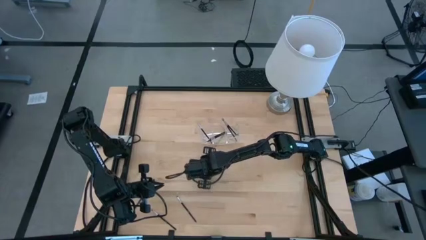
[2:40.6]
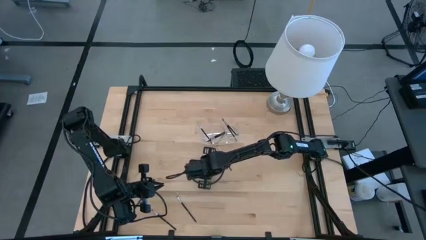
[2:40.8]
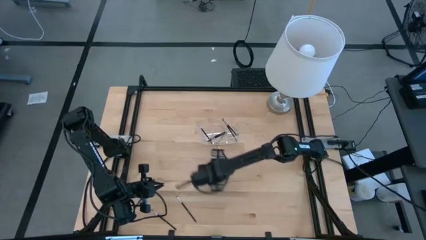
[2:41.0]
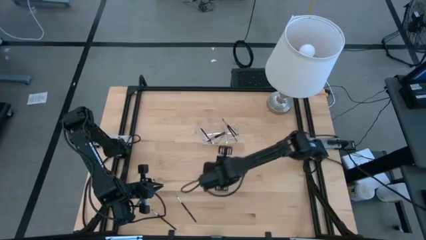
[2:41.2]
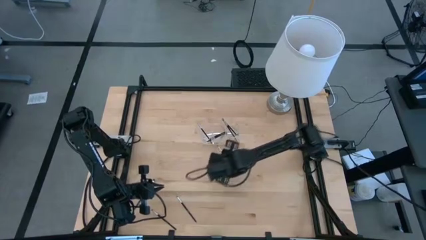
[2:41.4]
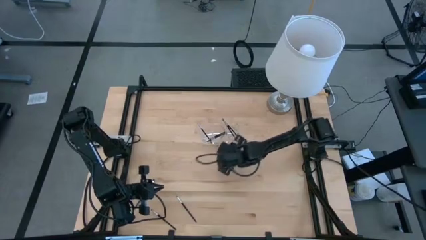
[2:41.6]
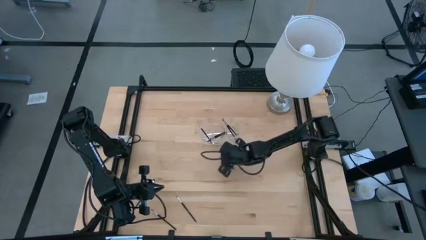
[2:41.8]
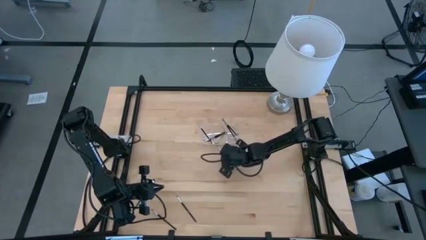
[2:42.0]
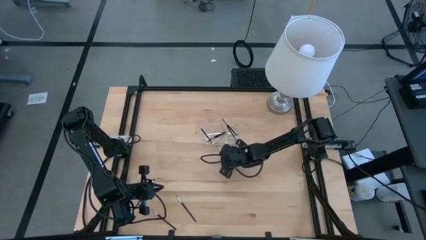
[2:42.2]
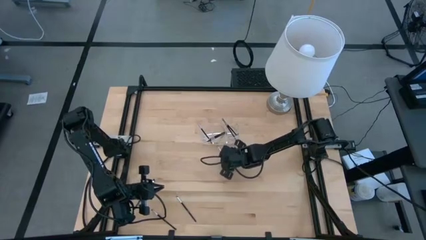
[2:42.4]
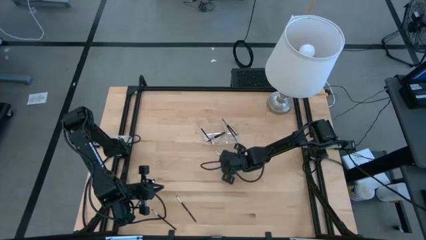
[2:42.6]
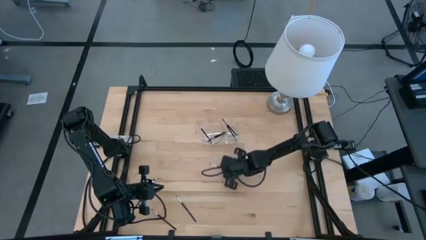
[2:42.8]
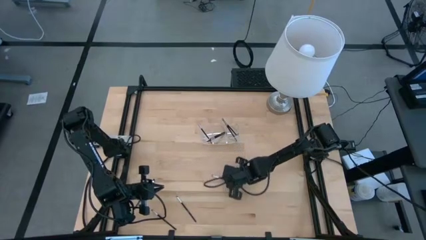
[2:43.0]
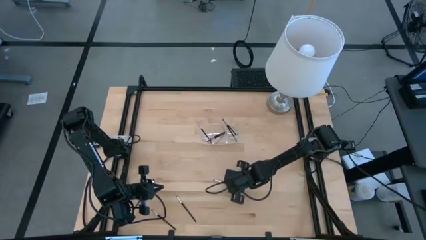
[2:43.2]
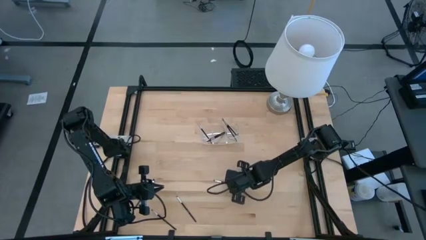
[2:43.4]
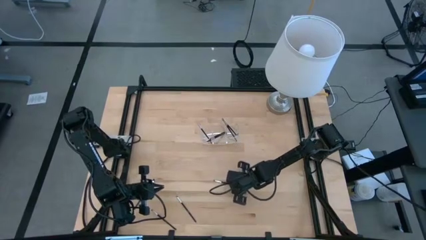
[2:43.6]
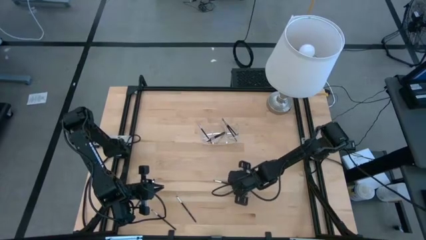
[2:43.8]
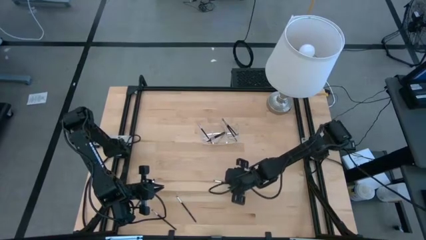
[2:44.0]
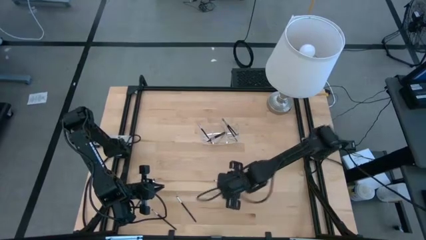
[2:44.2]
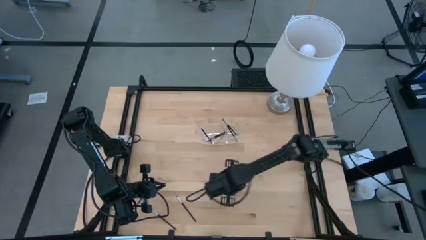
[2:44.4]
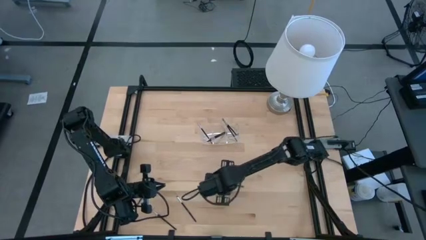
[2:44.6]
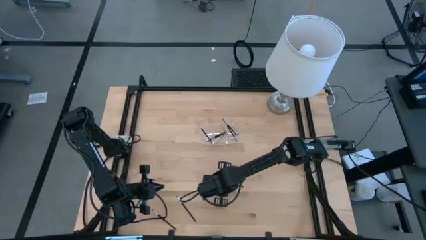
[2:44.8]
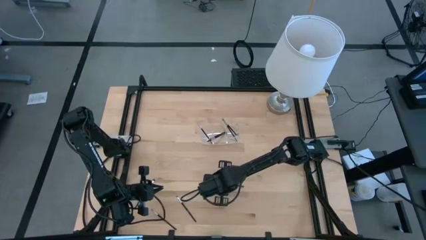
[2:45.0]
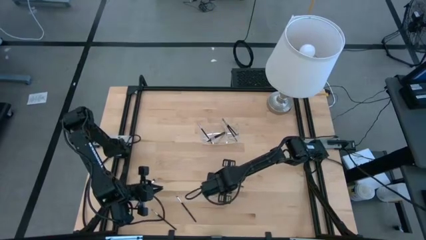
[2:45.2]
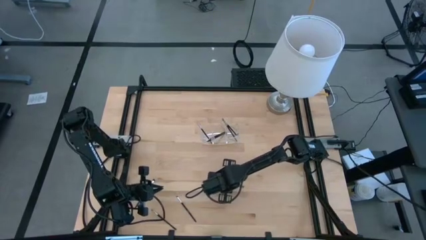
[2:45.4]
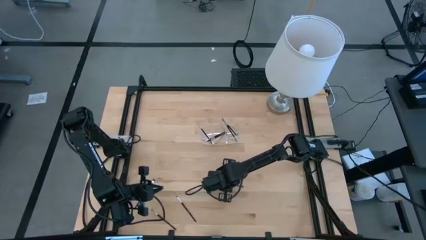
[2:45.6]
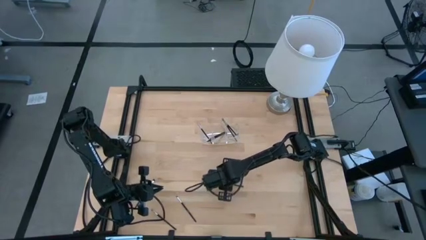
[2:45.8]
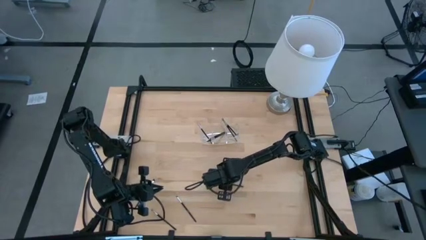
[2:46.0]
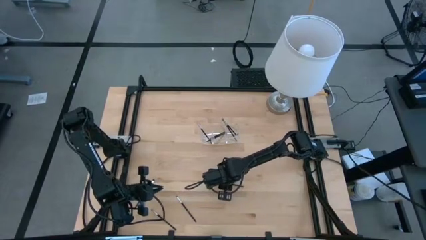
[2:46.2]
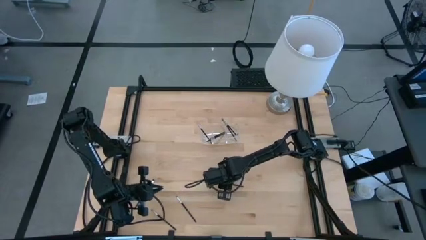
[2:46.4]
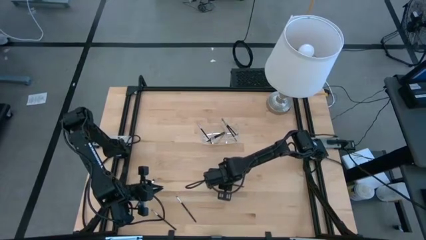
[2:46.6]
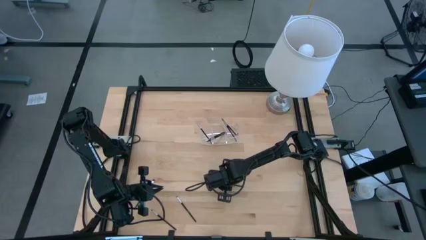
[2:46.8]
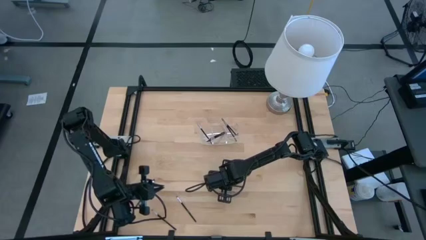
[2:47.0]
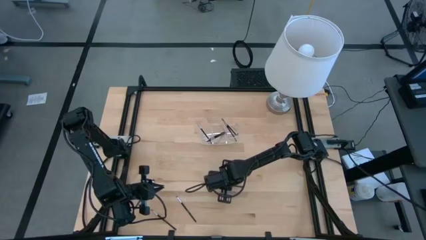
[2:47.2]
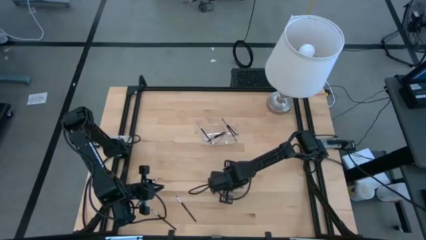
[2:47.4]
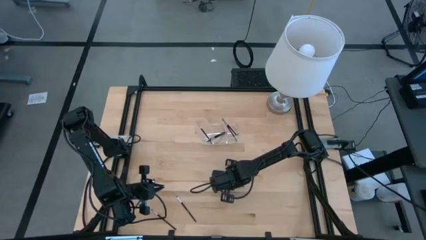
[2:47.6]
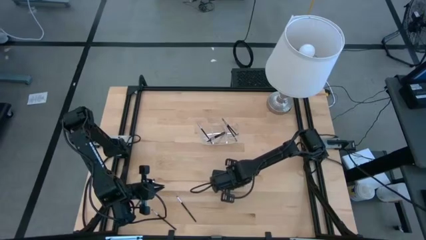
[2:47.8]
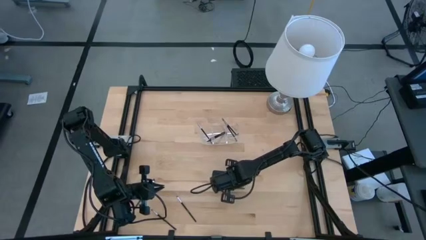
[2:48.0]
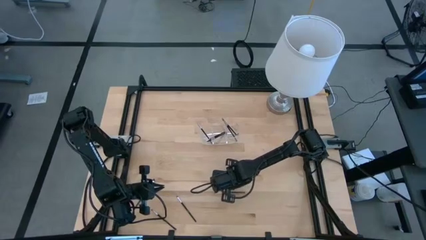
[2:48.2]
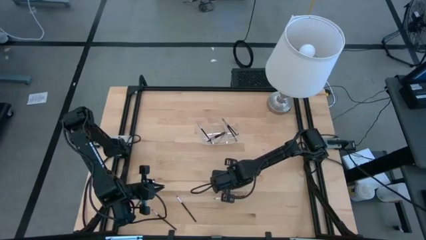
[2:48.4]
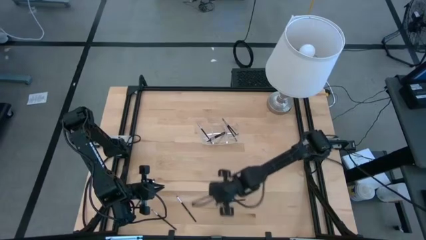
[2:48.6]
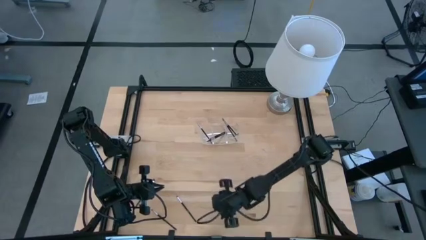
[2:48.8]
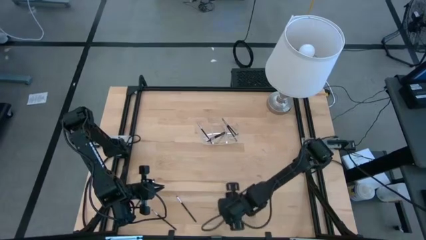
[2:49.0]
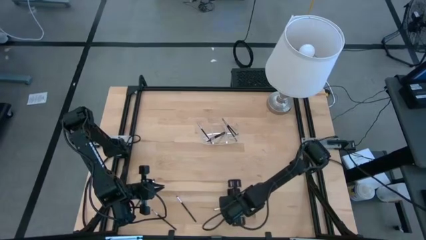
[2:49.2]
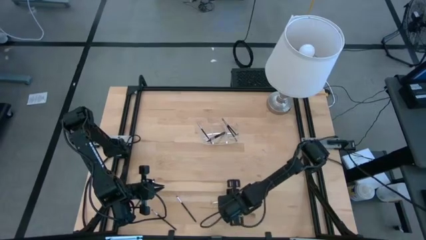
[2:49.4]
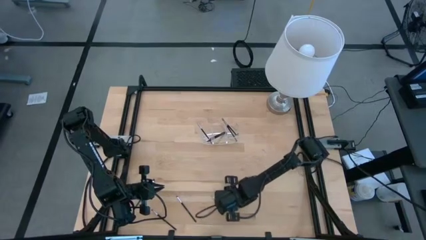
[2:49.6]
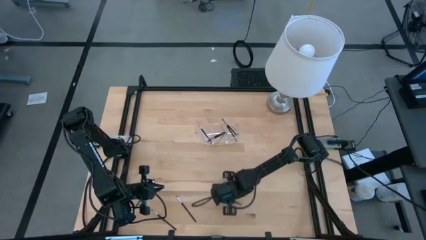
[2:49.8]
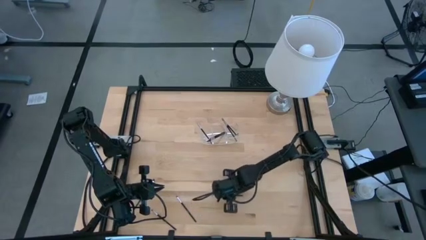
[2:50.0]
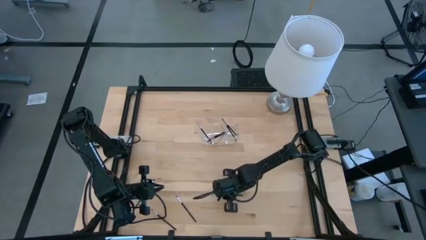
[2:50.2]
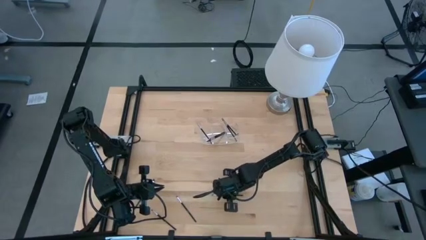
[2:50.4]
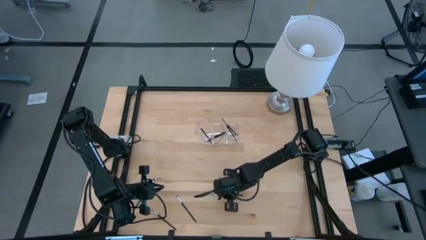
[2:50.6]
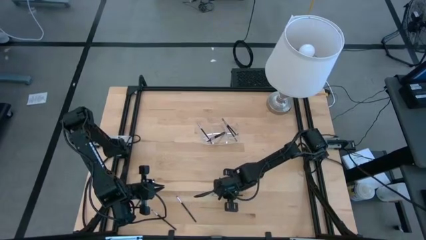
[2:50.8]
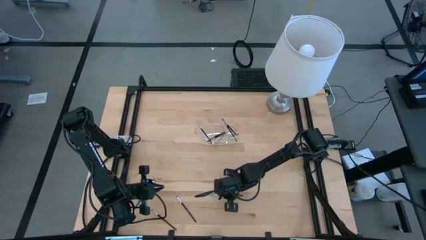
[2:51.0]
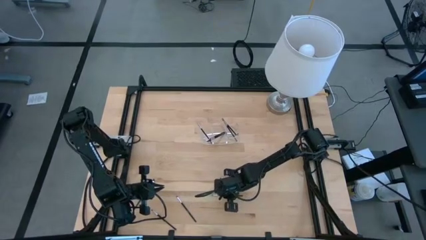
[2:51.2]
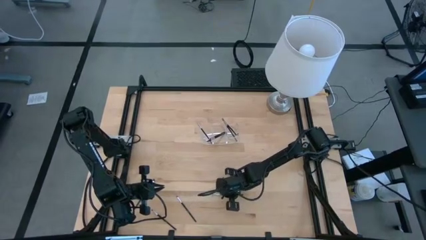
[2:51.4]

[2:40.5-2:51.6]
Task: Pick & Place Makeup Supplies
Put the makeup brush into the transparent organizer

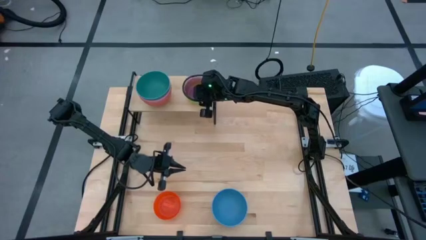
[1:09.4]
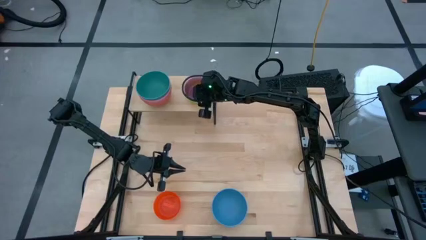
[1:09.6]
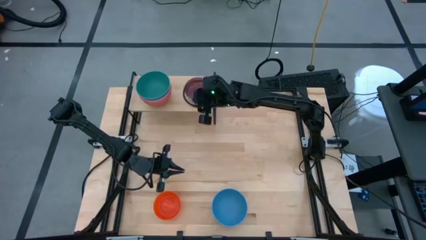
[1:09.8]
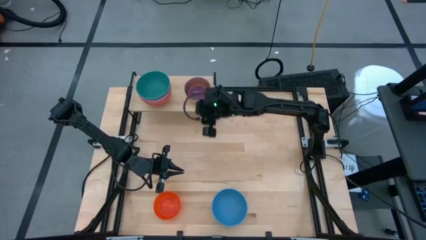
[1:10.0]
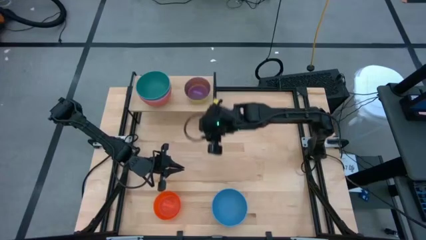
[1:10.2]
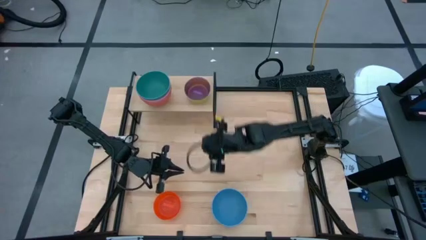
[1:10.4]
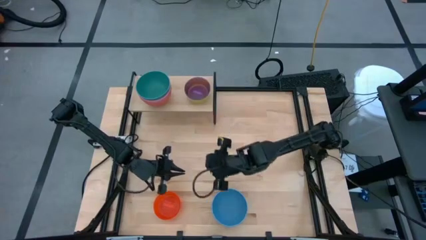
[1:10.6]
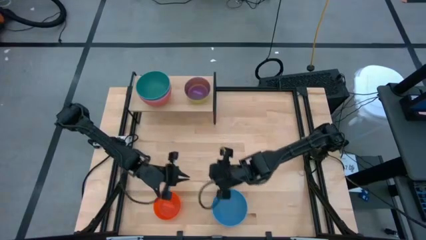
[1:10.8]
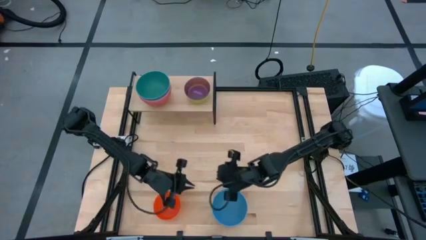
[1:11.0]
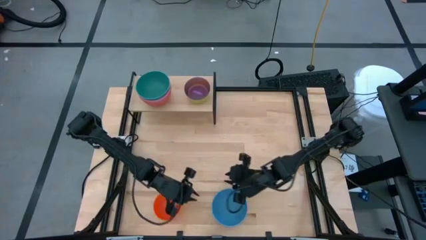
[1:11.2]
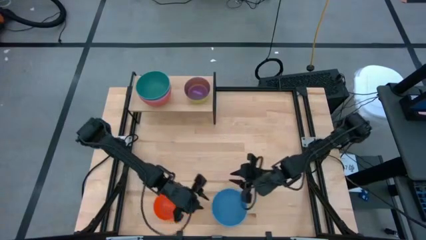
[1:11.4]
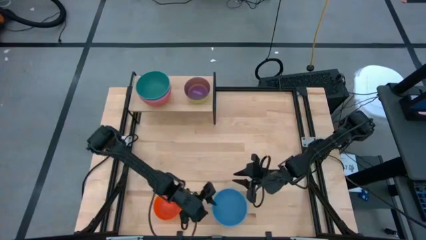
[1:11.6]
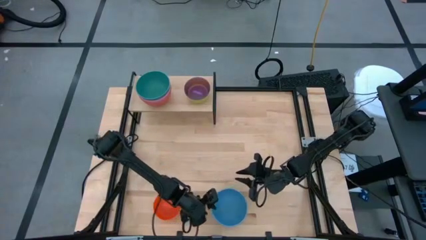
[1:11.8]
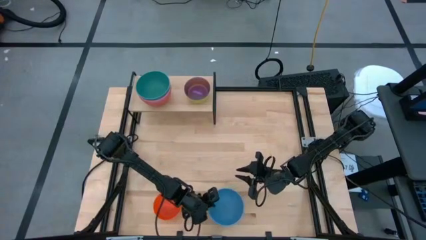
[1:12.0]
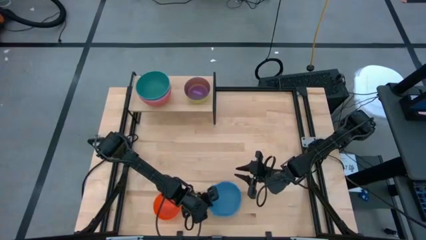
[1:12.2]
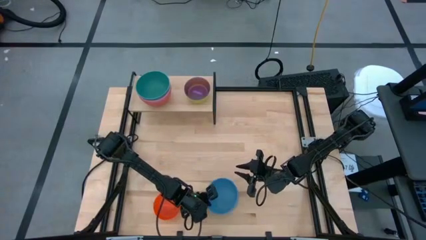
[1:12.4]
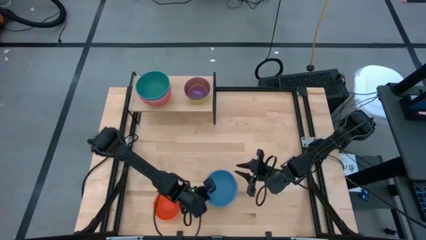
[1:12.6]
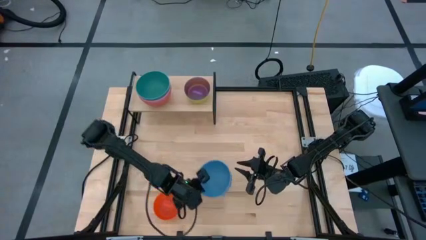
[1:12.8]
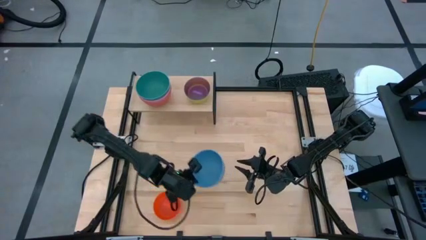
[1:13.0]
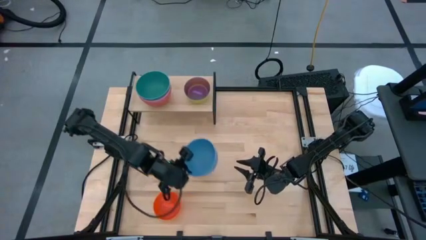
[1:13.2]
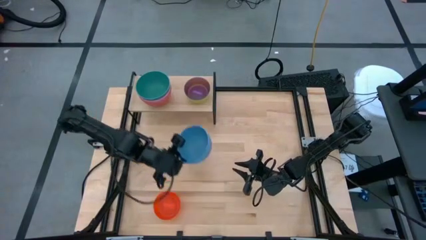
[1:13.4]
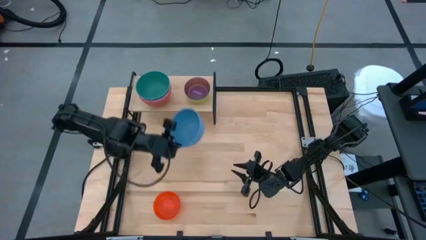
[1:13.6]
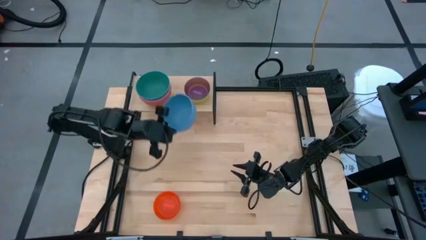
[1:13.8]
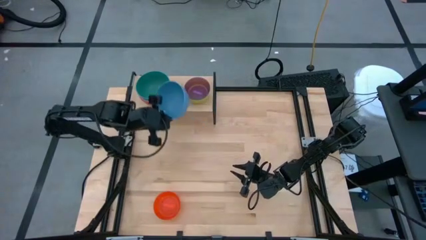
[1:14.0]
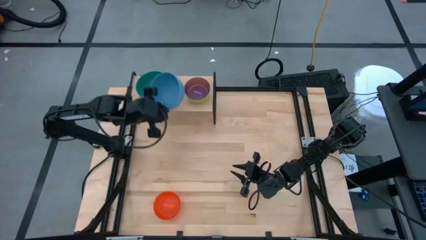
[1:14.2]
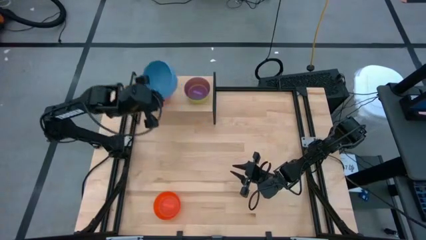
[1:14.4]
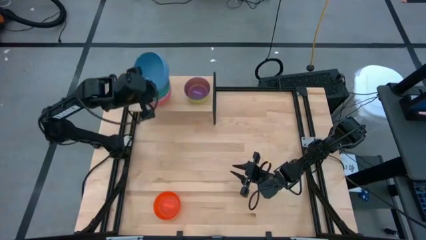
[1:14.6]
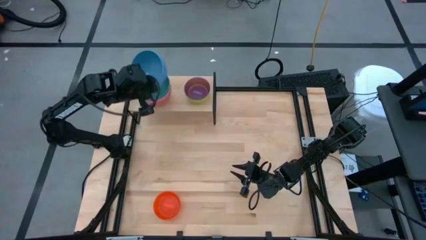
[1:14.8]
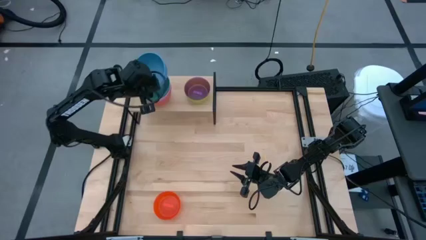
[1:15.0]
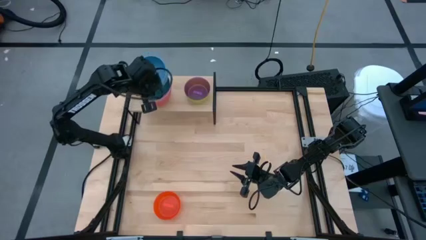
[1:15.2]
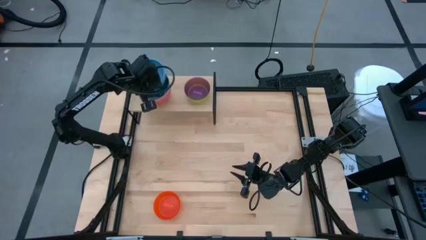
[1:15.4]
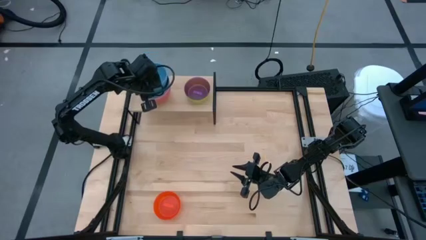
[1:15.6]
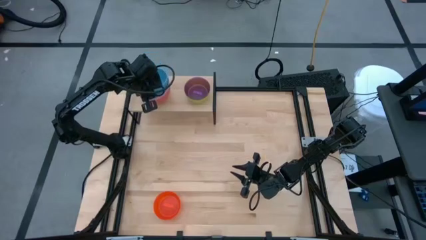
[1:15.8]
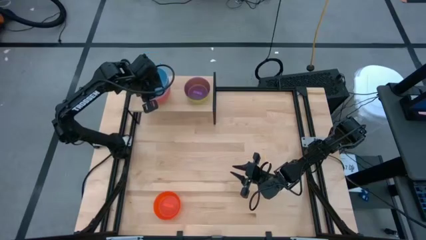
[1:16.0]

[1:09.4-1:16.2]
Task: Place and stack bowls onto a shelf
Stack the blue bowl into the blue green bowl on the shelf
